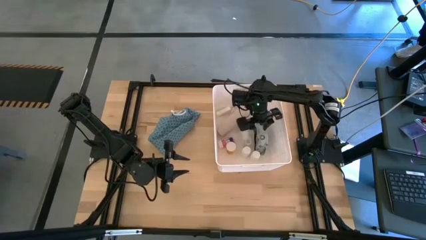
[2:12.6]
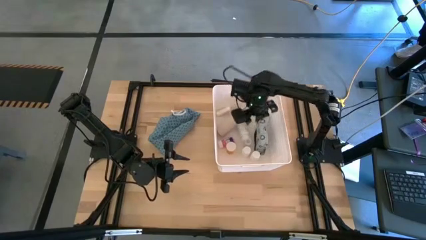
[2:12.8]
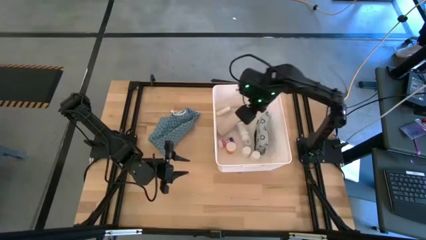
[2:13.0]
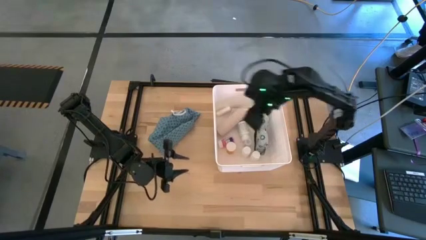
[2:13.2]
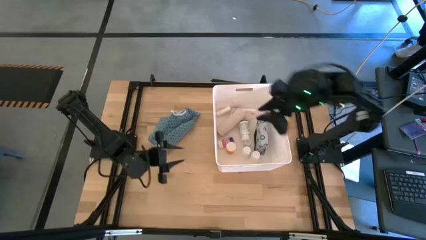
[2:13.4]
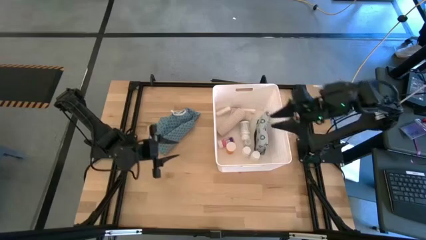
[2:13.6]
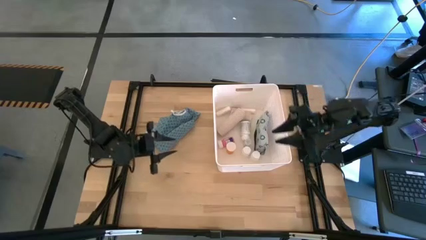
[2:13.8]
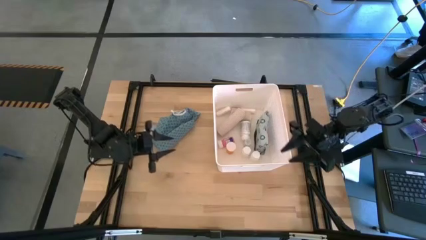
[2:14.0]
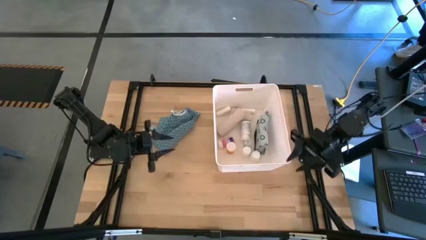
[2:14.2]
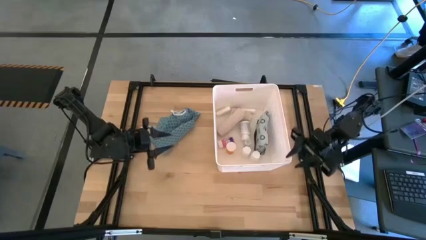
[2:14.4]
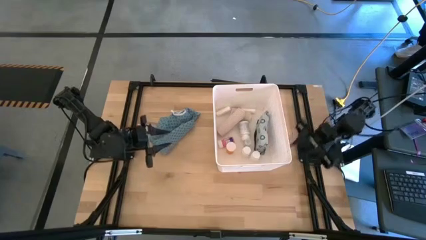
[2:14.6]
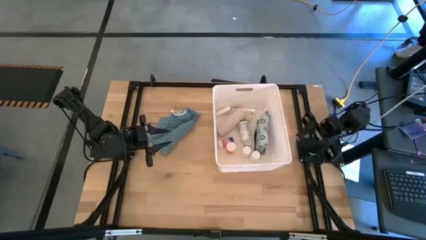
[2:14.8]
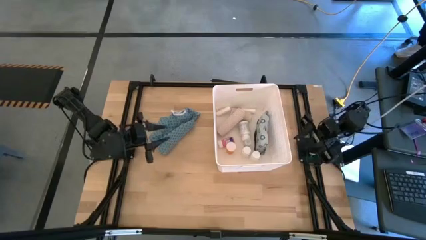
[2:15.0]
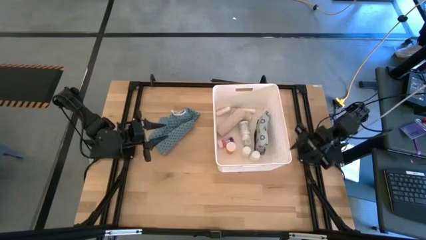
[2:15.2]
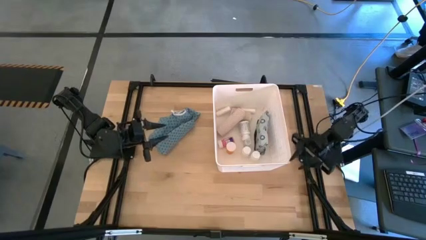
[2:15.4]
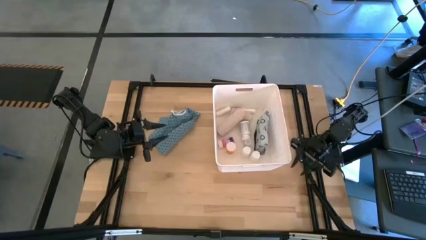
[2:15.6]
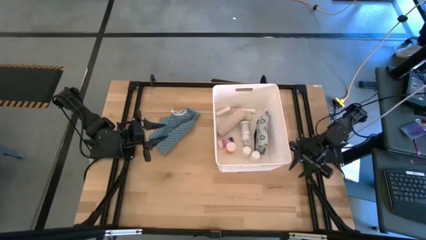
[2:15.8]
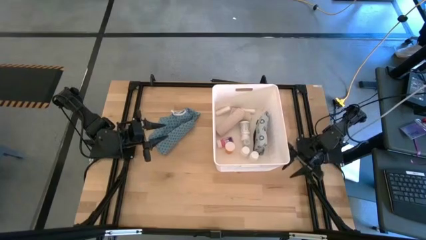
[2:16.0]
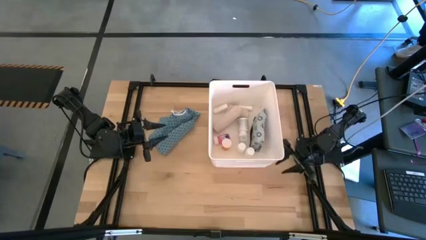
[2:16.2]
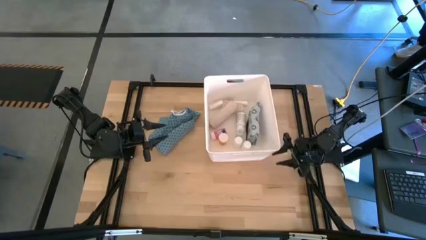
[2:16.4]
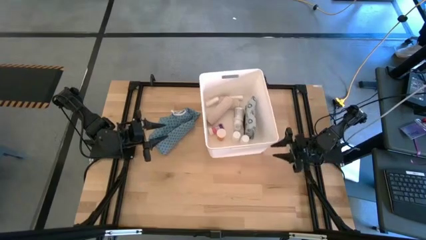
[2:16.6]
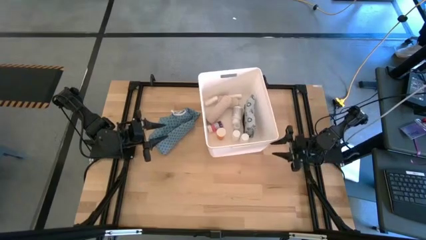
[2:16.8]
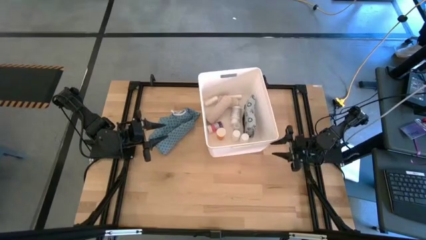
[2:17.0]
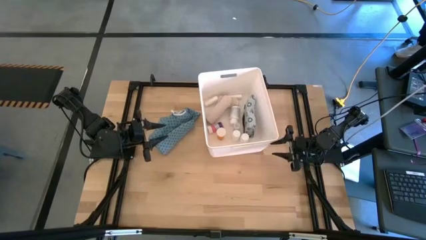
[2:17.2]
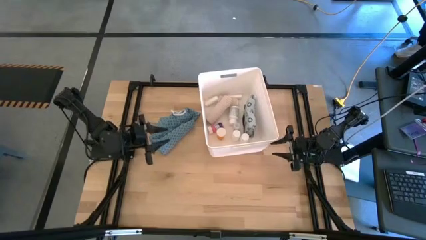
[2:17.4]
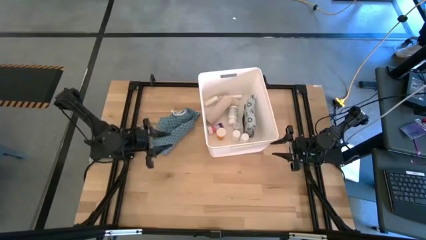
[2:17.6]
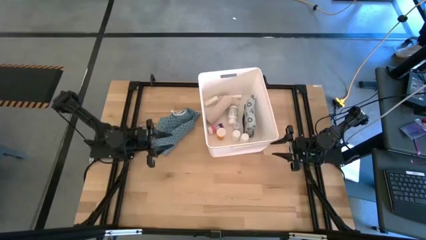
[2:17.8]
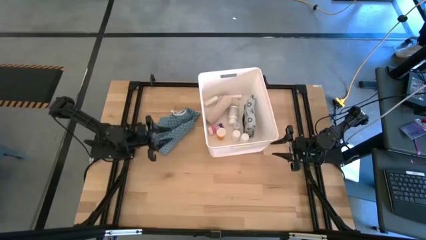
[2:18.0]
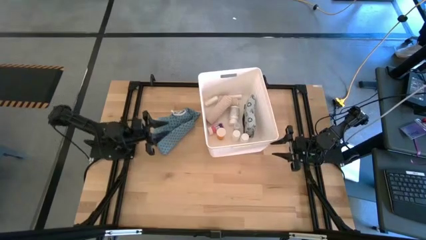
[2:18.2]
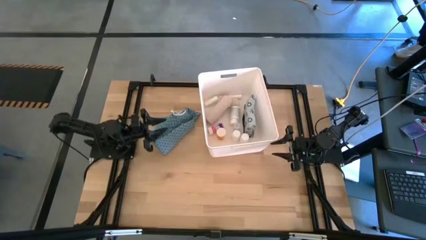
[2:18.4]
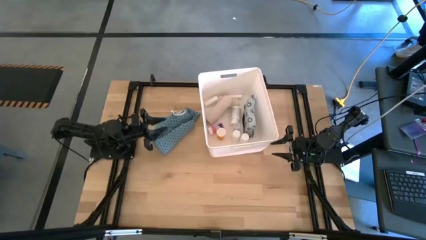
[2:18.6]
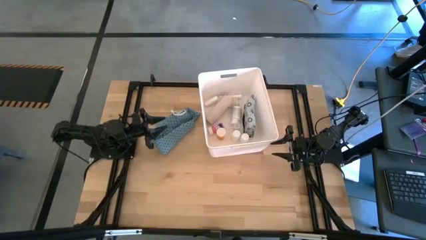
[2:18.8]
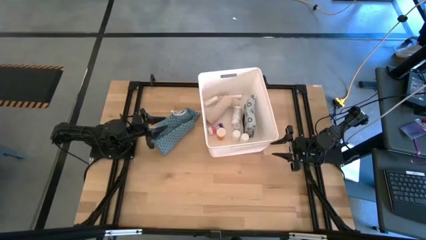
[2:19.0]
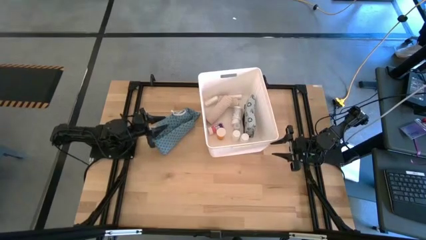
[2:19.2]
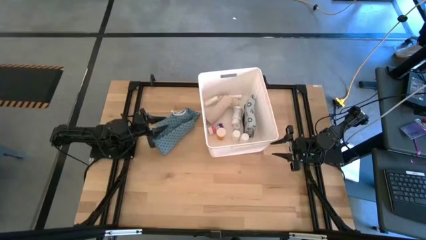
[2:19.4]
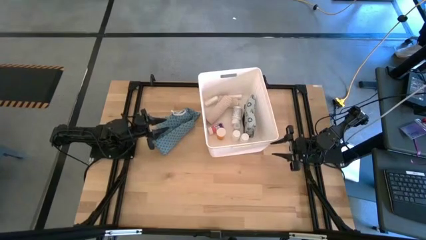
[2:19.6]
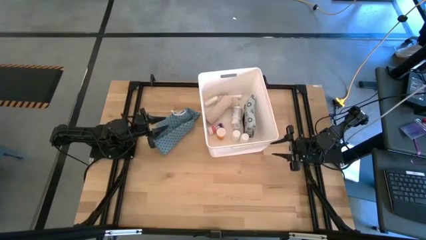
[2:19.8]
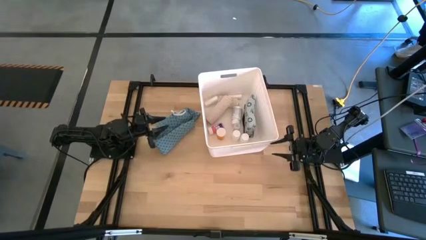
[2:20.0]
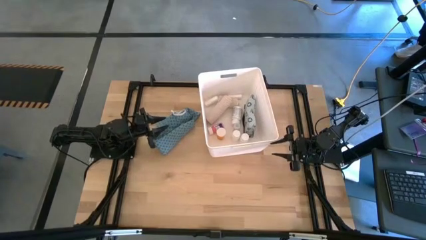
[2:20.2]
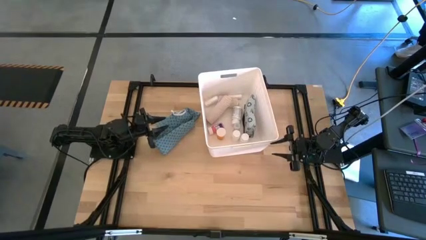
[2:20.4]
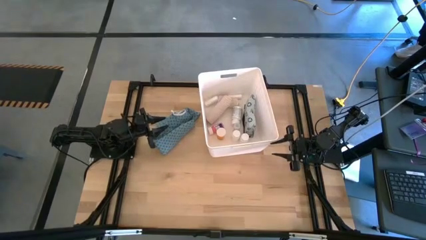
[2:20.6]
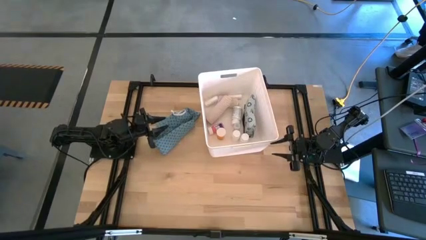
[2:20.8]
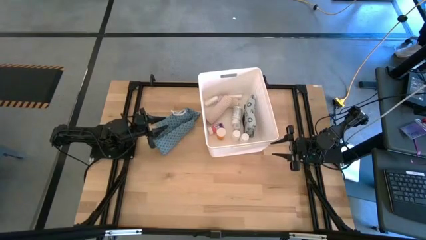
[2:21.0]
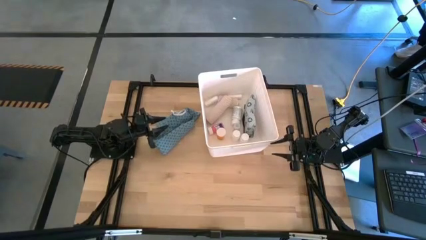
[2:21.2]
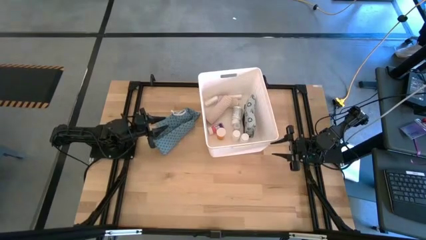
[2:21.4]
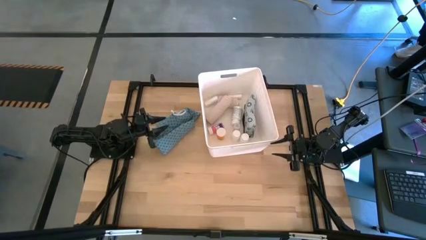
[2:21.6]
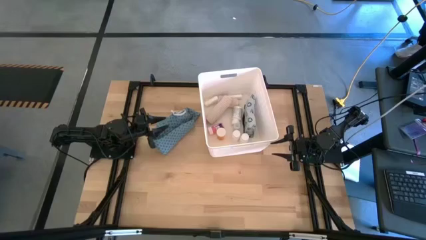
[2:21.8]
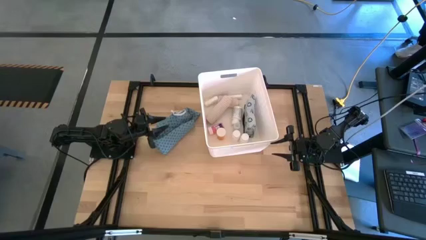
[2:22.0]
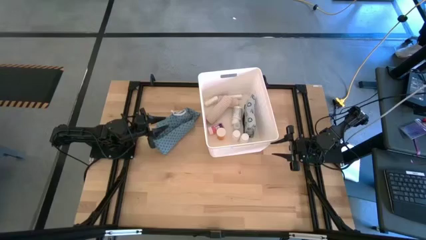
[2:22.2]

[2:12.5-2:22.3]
Task: Pick & place medical supplies in basket/bin
Return to Home Position
